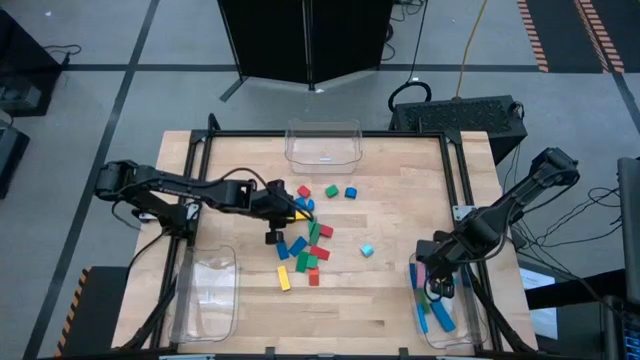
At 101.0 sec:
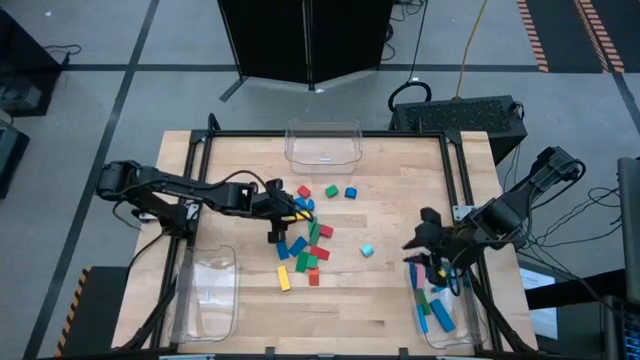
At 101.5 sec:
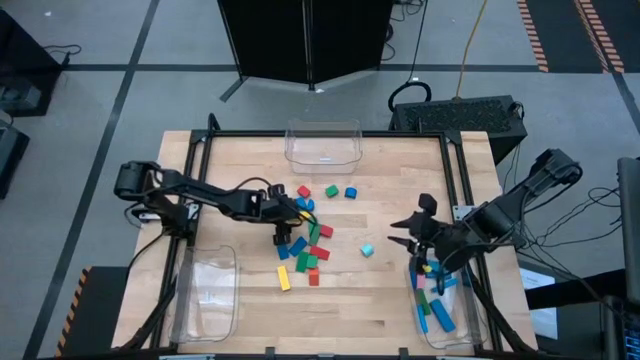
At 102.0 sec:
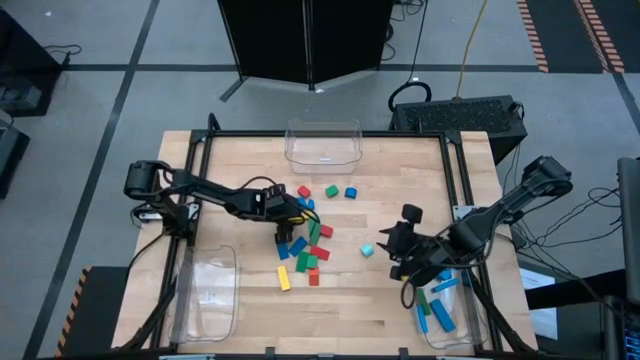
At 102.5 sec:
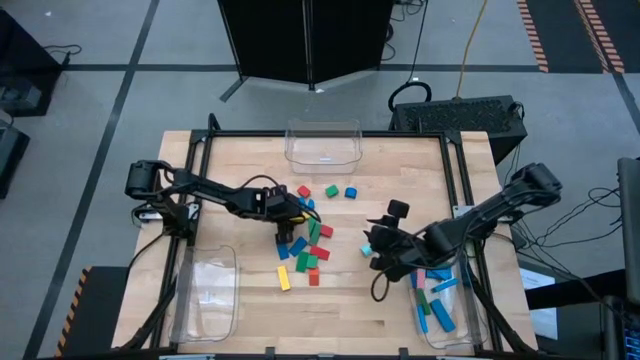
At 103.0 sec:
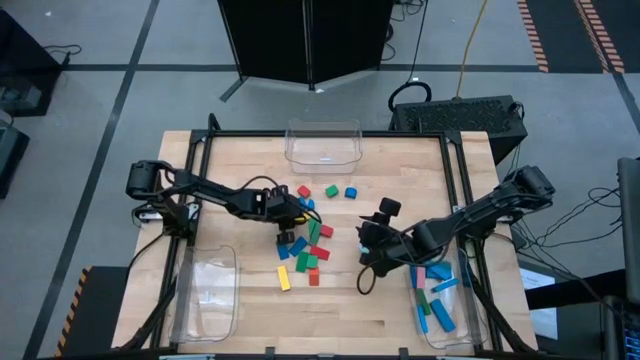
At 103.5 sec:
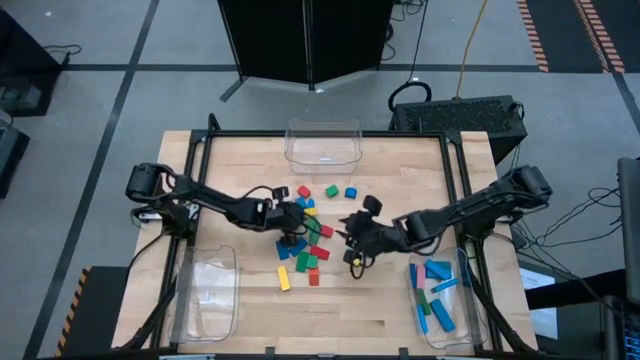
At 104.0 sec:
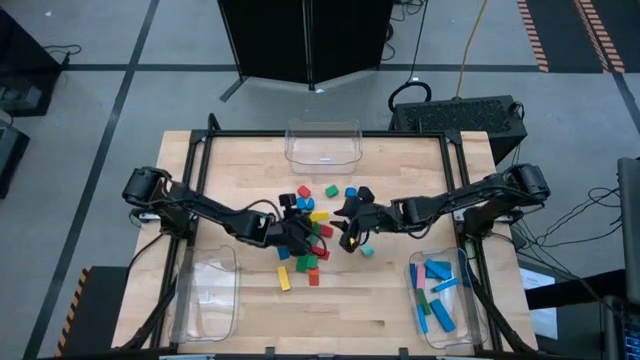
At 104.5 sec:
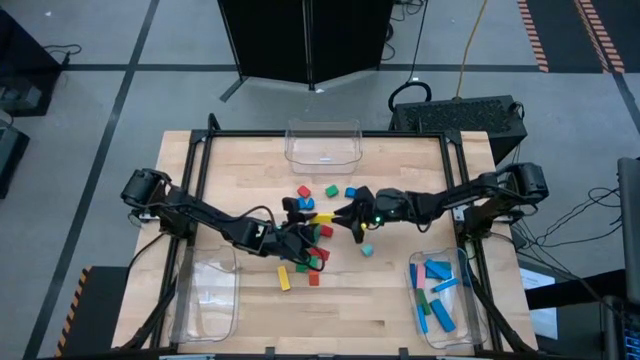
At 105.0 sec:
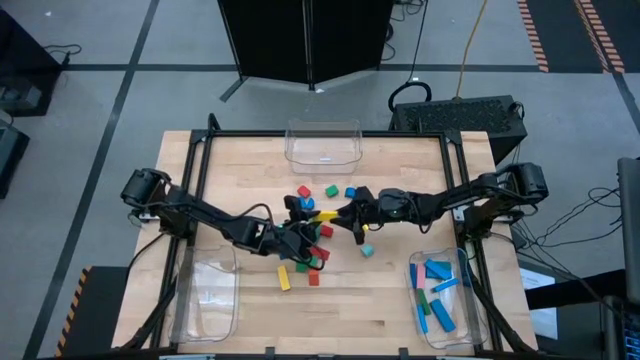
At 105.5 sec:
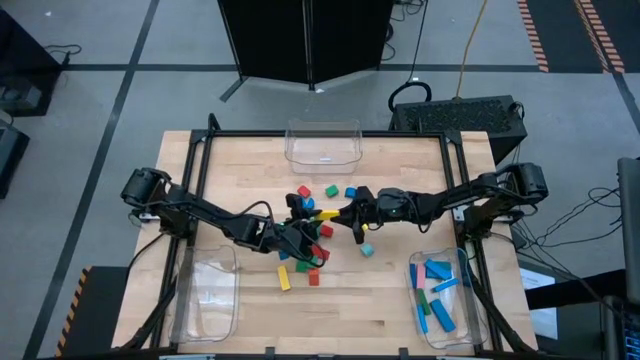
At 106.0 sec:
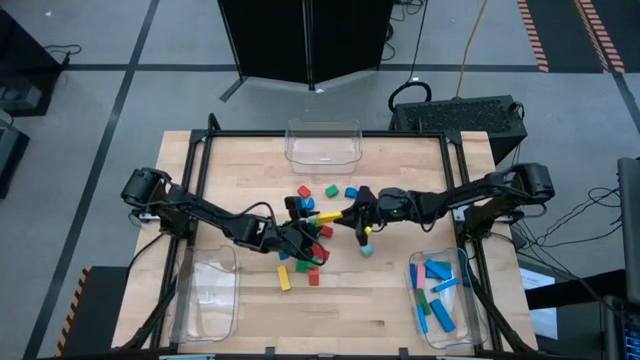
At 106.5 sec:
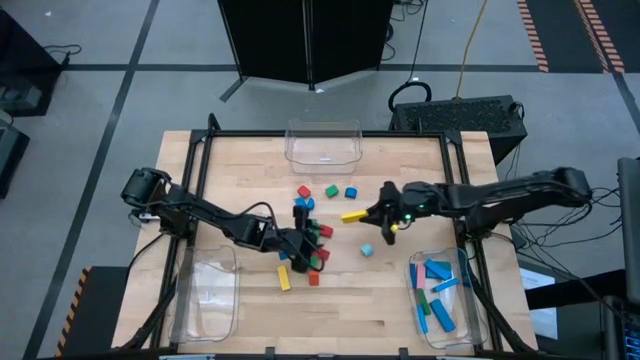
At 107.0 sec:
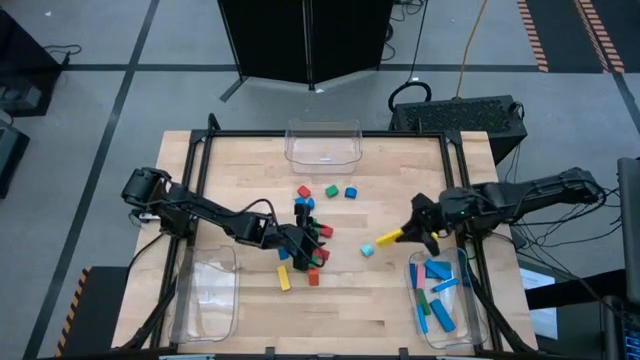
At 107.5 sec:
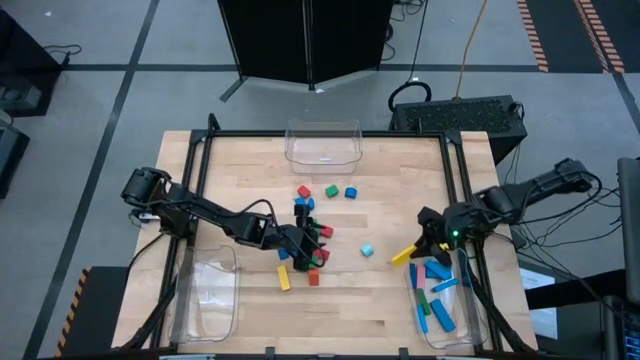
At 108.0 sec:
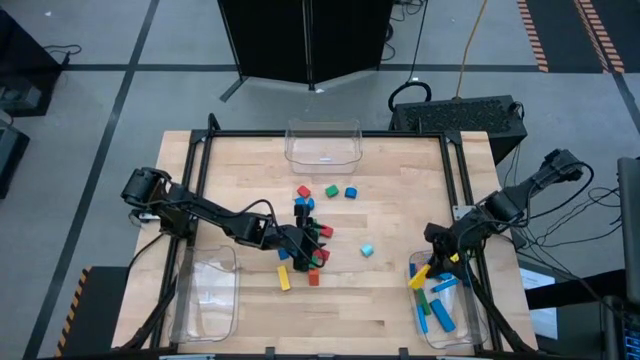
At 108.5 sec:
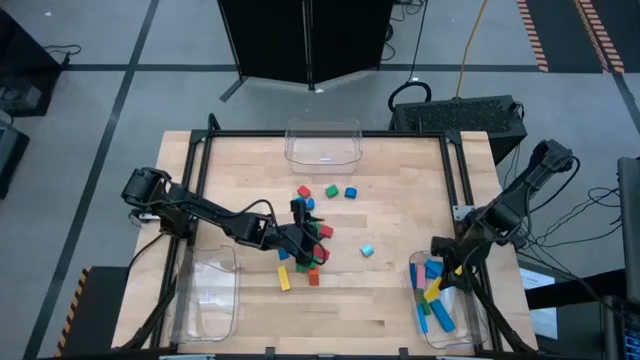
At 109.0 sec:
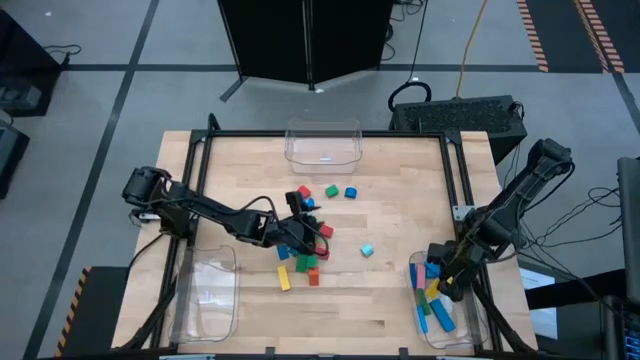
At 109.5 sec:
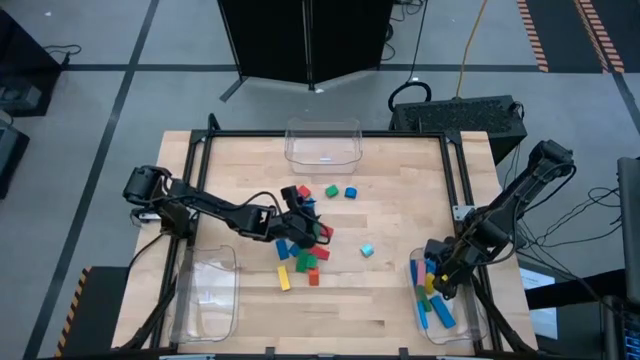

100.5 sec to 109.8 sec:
Task: Sort blocks by size
Put the yellow rectangle block into the bottom right transparent bin

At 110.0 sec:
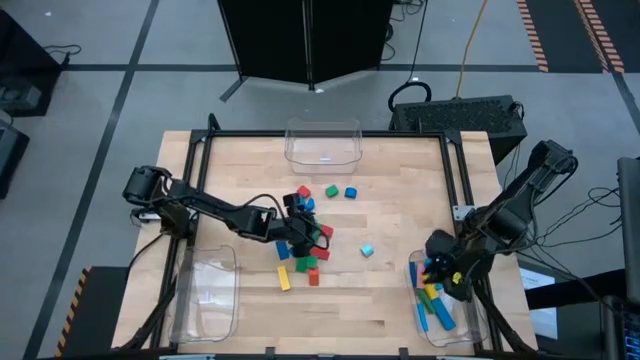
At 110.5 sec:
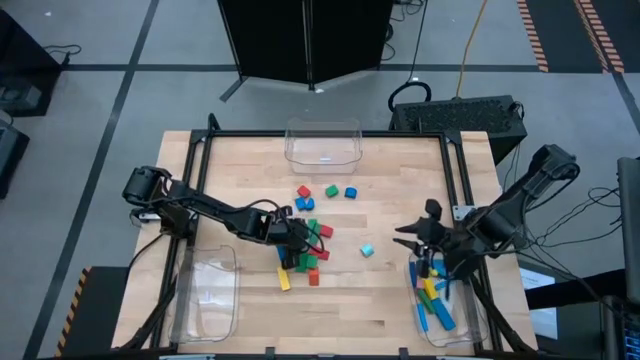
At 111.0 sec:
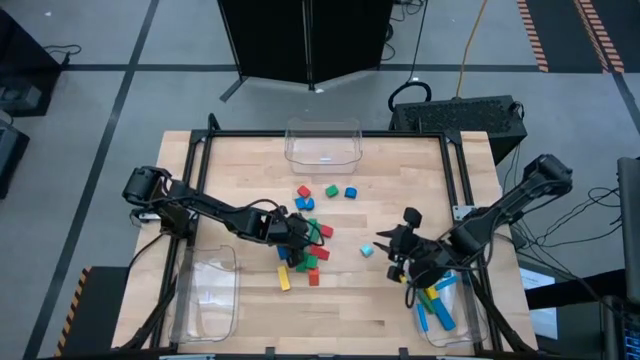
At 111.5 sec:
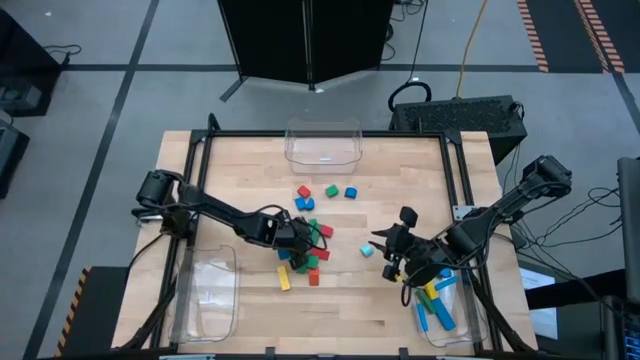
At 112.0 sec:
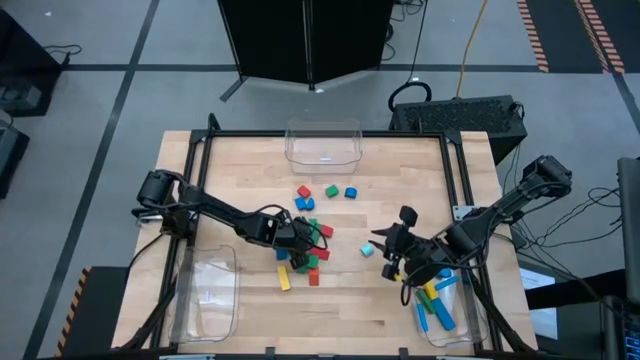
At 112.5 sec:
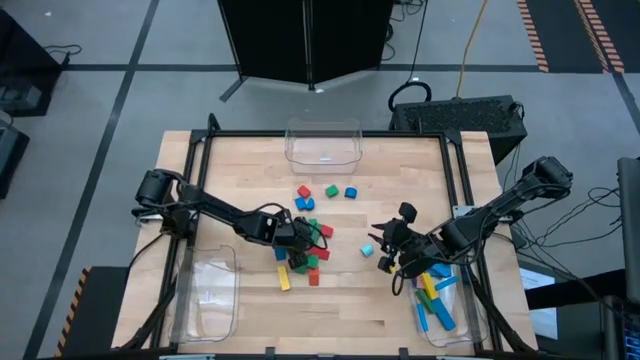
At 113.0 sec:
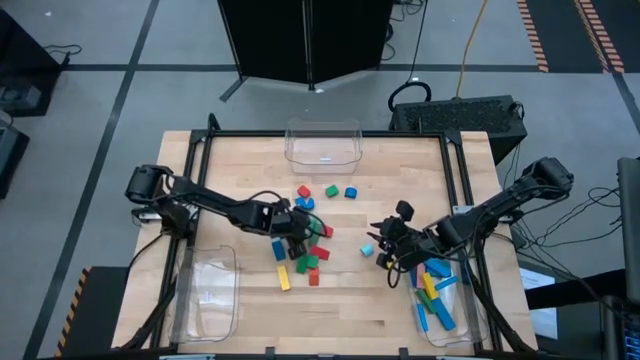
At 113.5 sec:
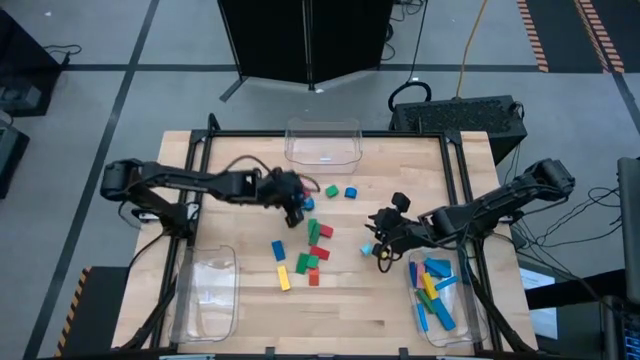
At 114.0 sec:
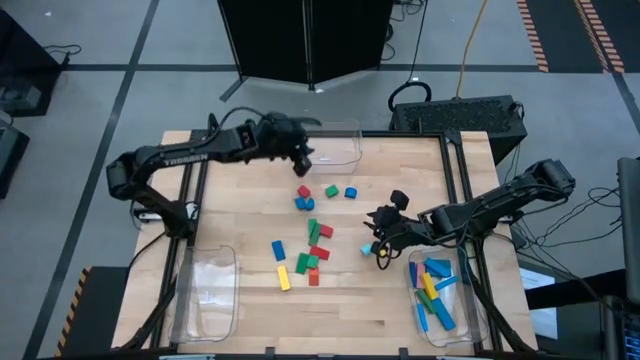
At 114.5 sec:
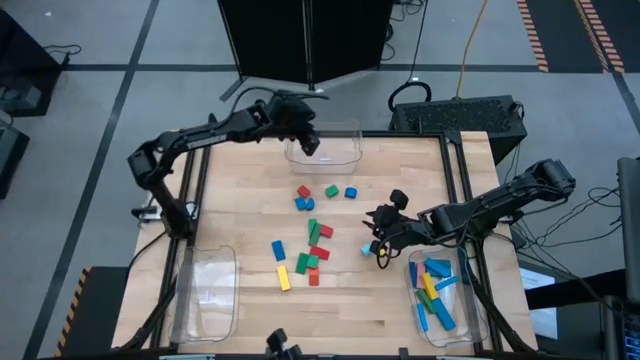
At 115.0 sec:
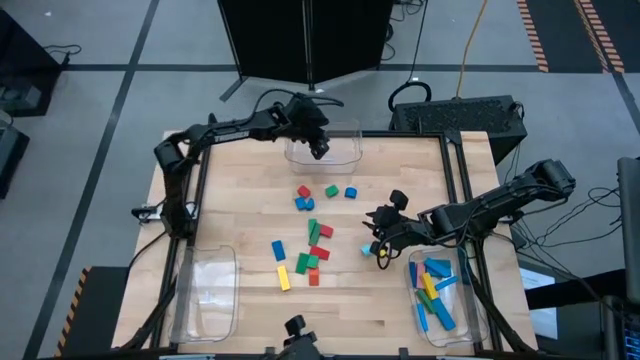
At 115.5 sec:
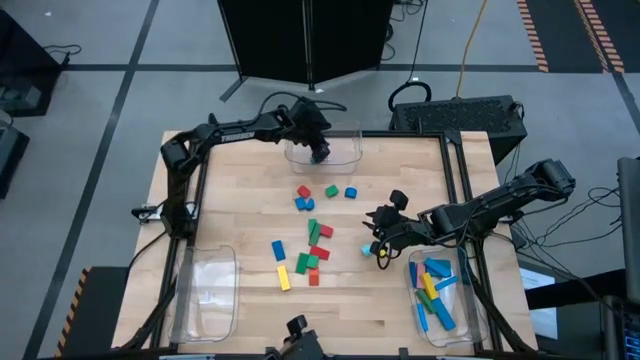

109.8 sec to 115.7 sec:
Put the dark blue triangle block into the top transparent bin

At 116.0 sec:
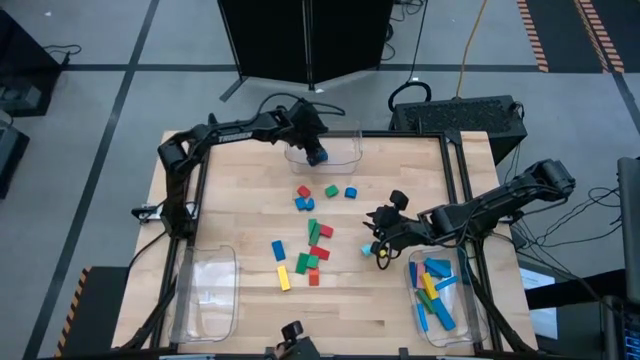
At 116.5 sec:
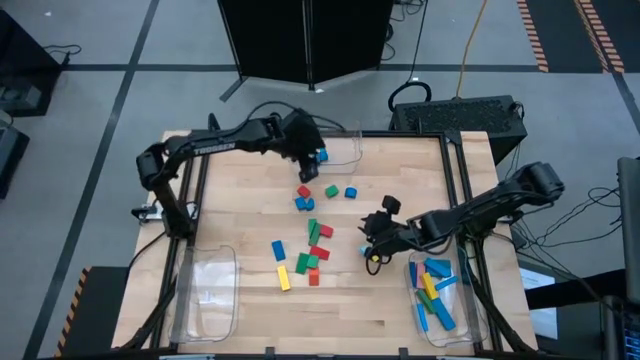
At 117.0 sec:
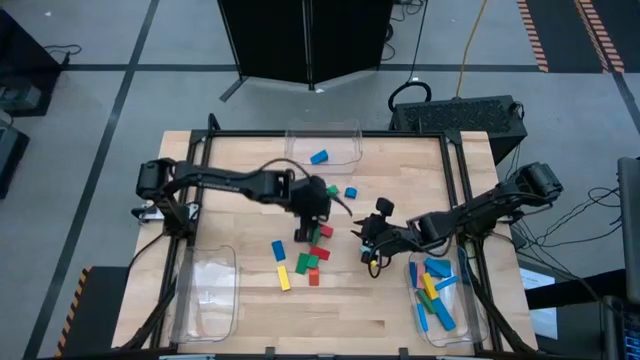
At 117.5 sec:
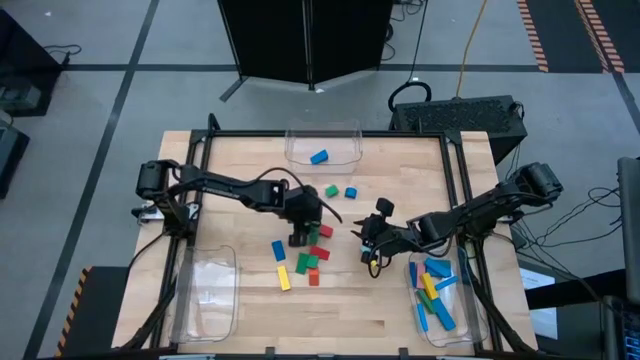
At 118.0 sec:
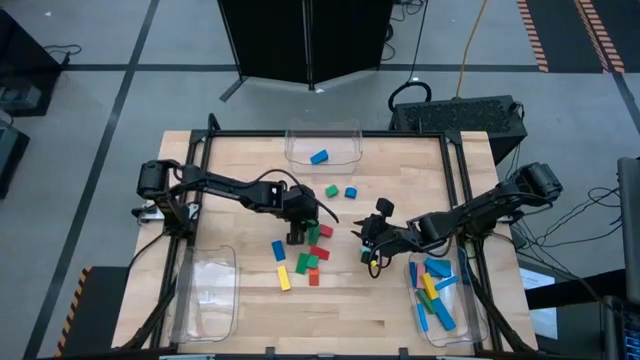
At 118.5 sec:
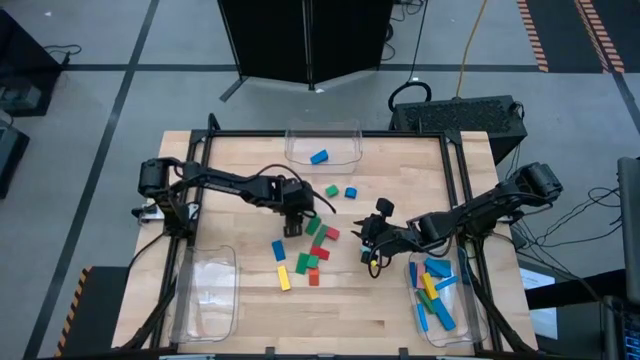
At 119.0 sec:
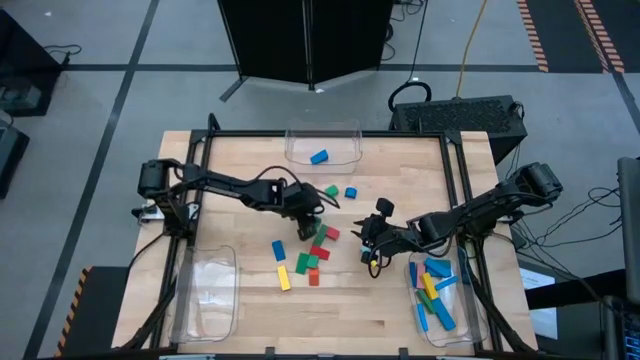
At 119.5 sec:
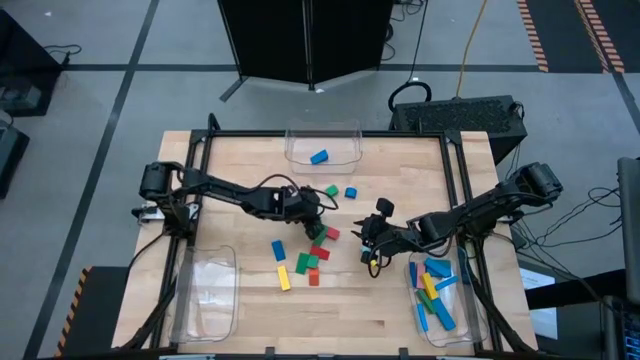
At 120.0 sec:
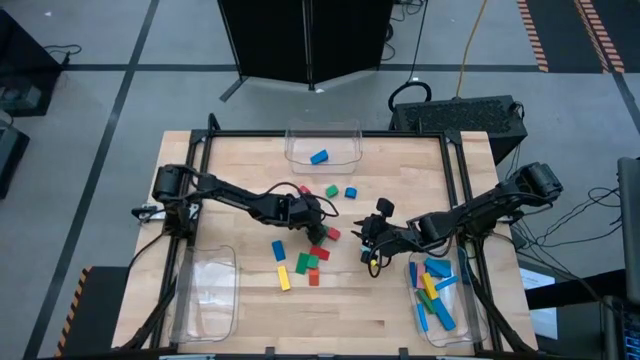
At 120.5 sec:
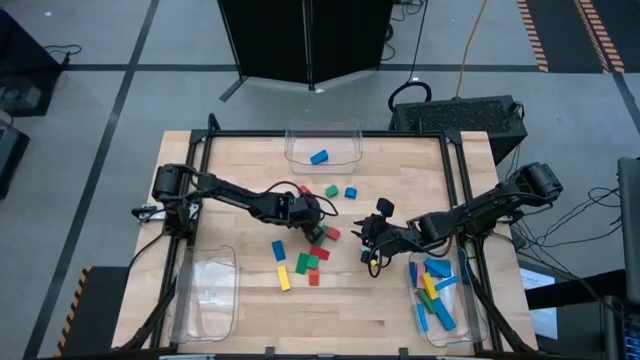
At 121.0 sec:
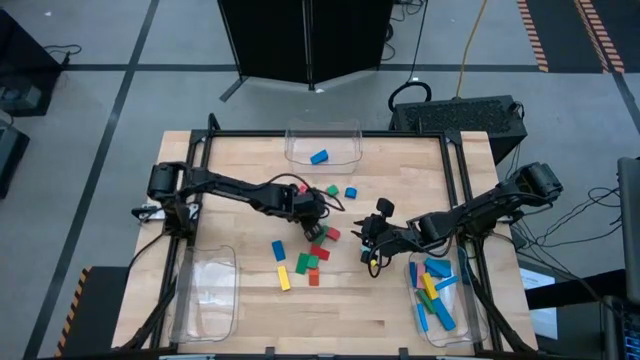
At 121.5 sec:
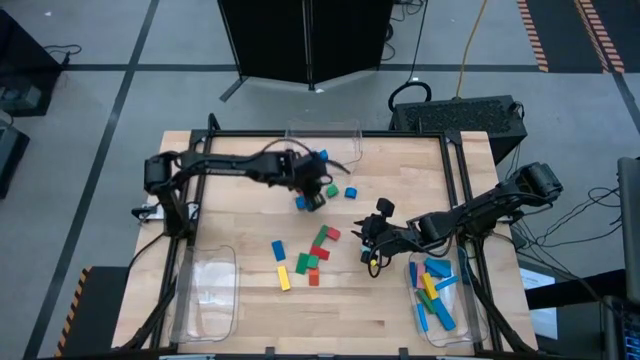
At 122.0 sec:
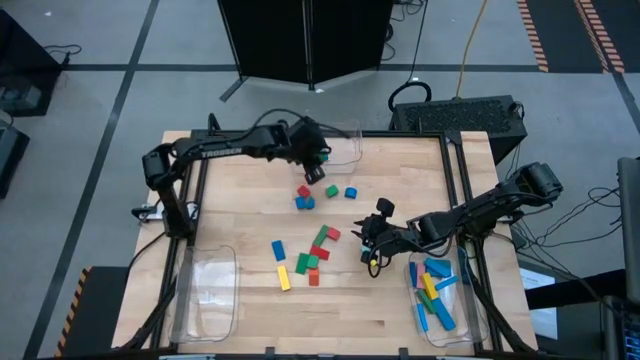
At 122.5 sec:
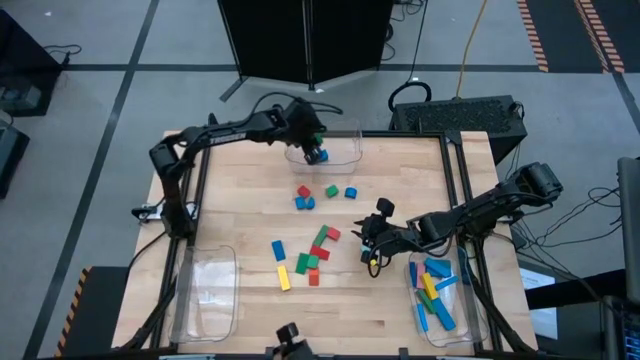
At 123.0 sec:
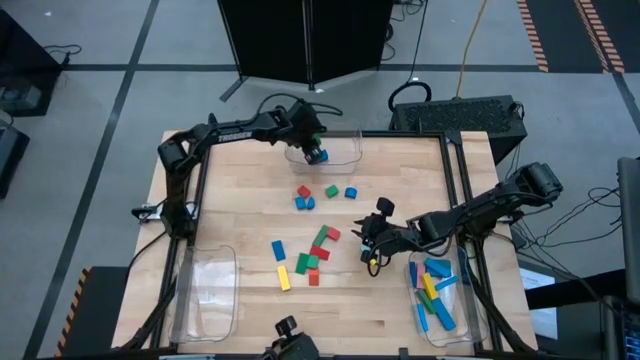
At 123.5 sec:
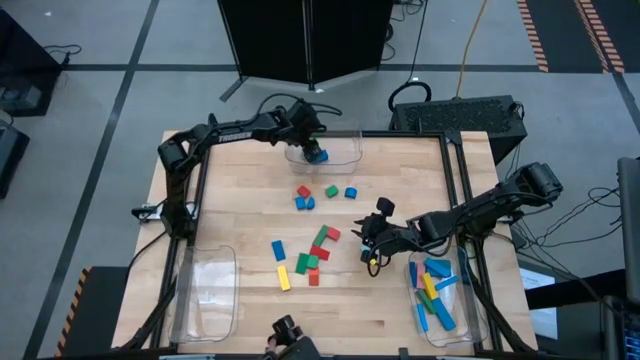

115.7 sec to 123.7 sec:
Put the green triangle block into the top transparent bin
